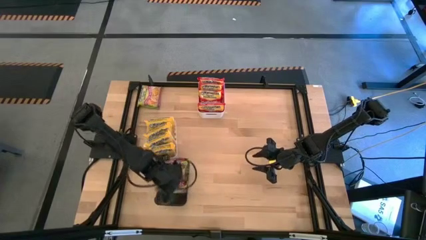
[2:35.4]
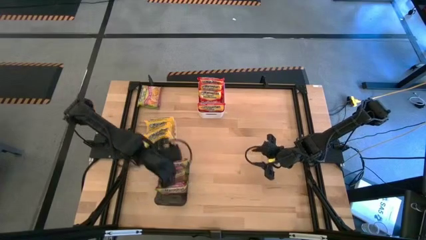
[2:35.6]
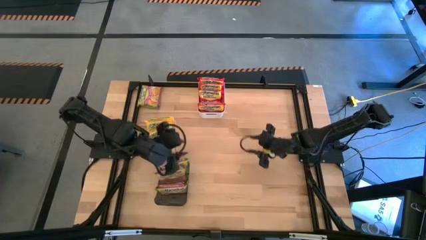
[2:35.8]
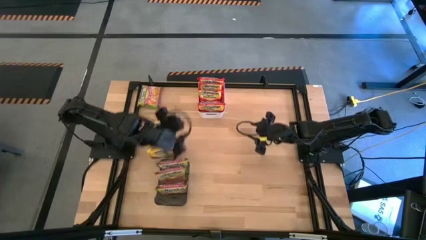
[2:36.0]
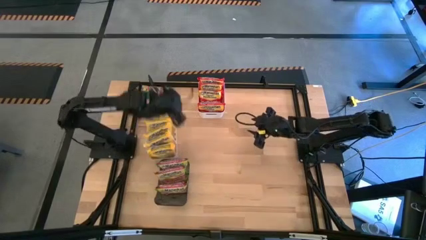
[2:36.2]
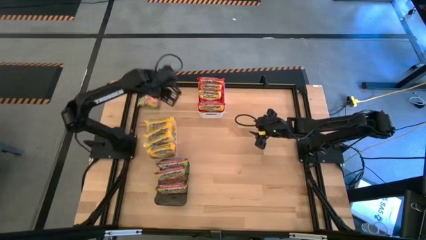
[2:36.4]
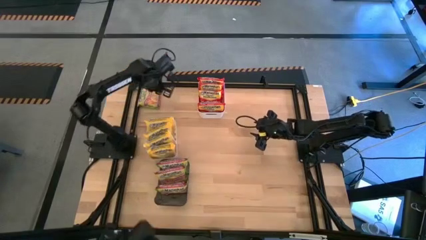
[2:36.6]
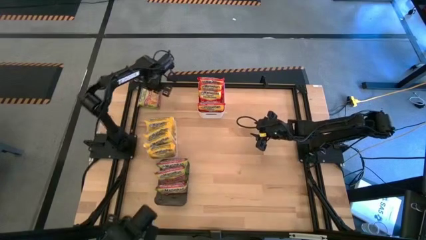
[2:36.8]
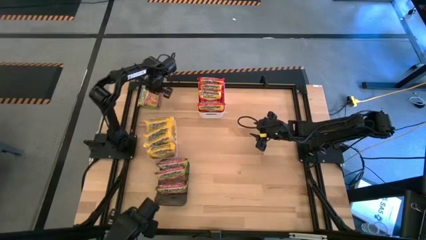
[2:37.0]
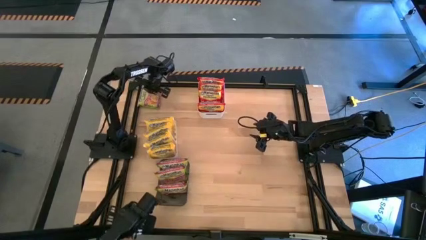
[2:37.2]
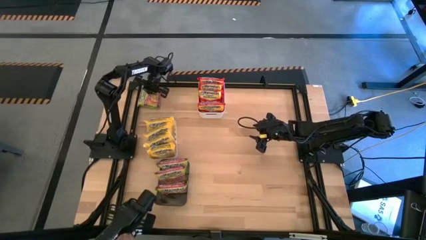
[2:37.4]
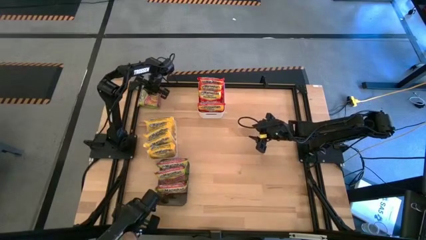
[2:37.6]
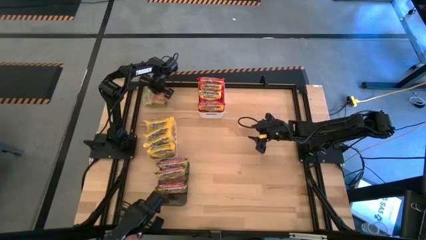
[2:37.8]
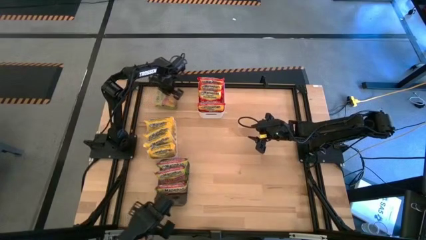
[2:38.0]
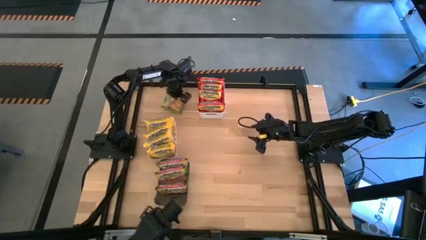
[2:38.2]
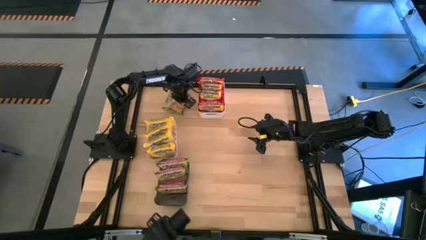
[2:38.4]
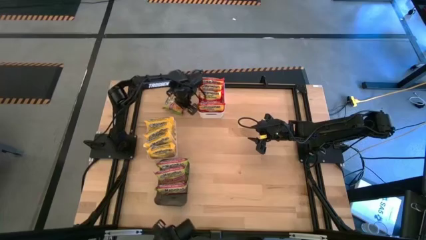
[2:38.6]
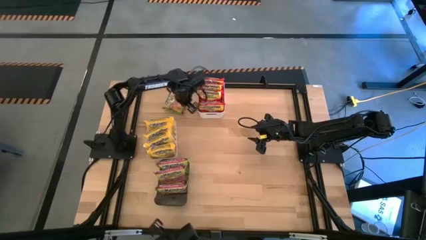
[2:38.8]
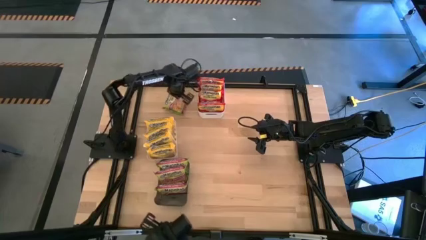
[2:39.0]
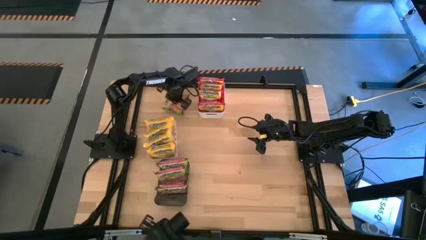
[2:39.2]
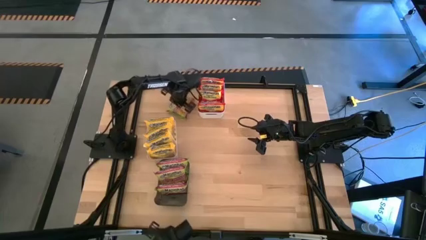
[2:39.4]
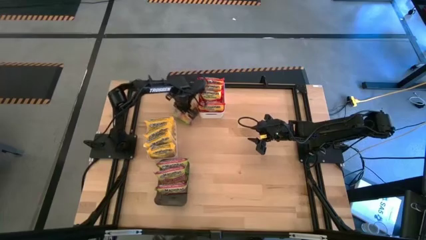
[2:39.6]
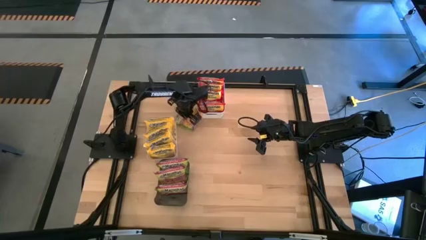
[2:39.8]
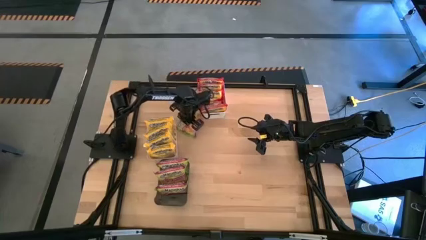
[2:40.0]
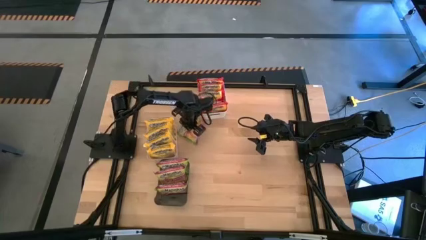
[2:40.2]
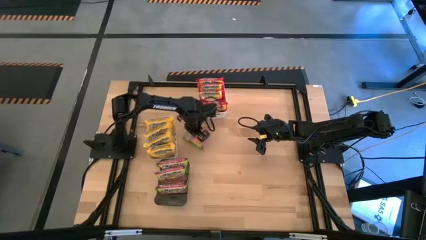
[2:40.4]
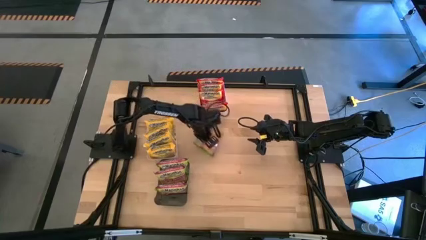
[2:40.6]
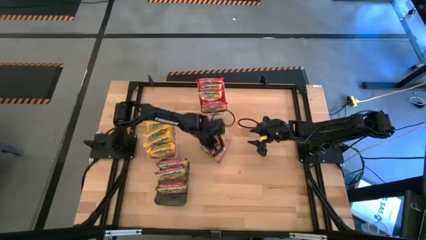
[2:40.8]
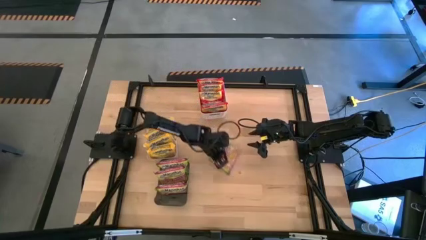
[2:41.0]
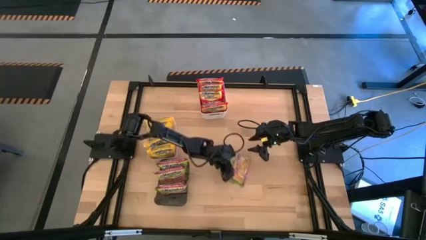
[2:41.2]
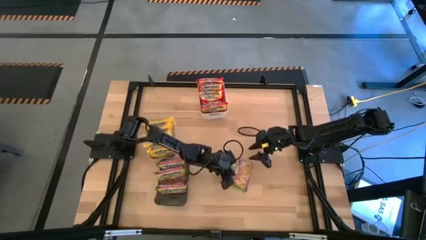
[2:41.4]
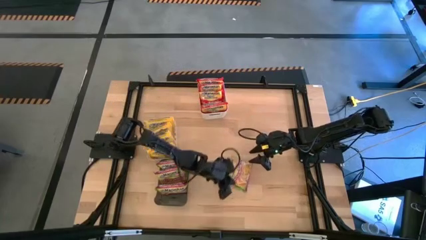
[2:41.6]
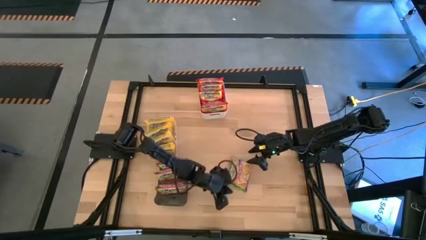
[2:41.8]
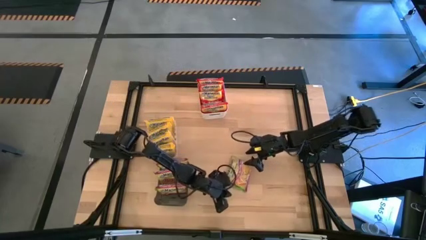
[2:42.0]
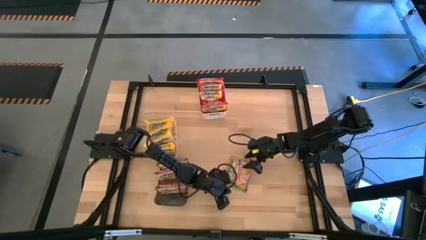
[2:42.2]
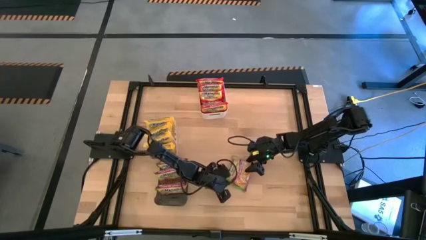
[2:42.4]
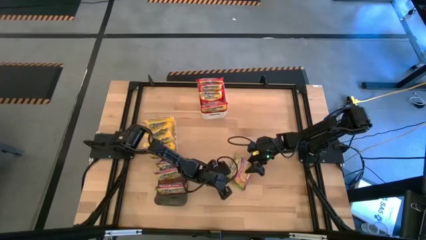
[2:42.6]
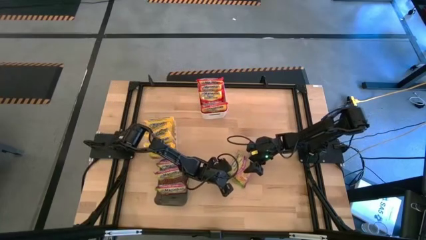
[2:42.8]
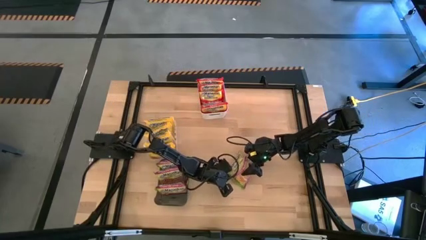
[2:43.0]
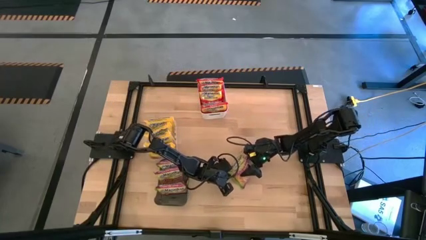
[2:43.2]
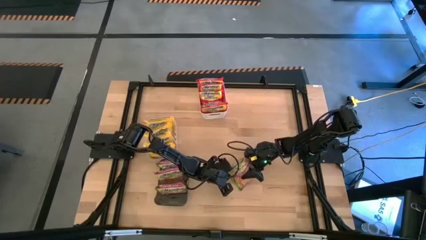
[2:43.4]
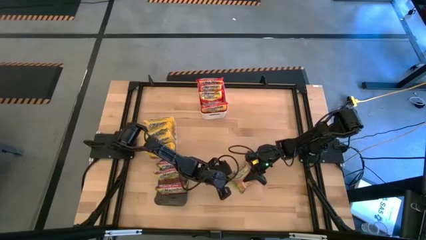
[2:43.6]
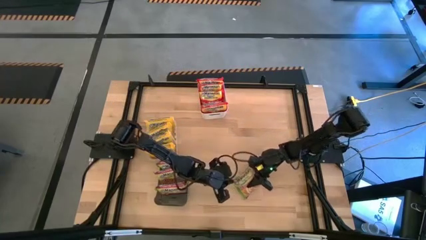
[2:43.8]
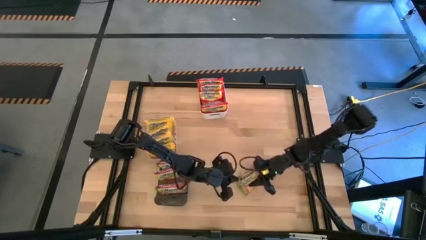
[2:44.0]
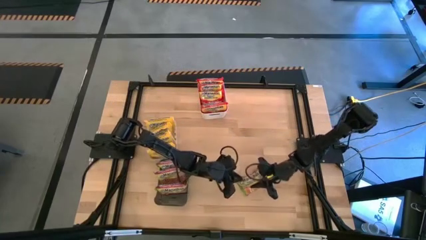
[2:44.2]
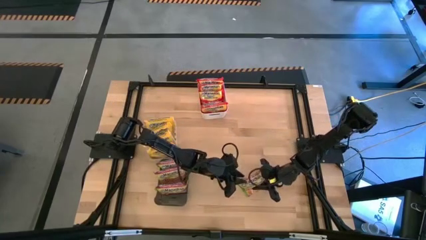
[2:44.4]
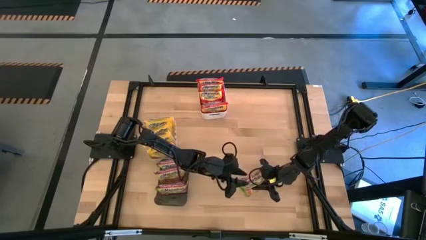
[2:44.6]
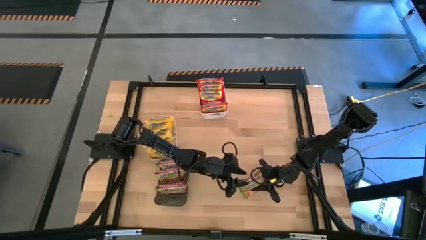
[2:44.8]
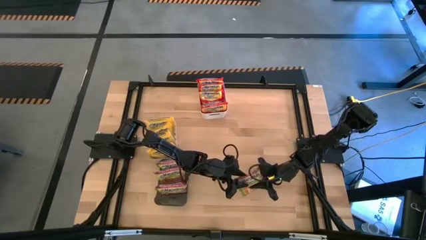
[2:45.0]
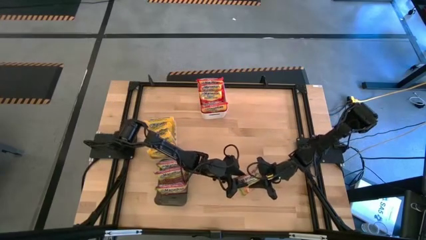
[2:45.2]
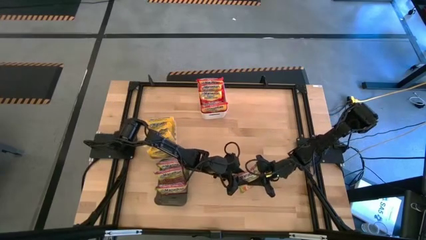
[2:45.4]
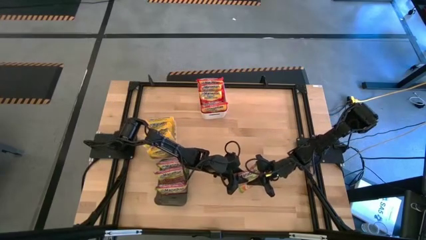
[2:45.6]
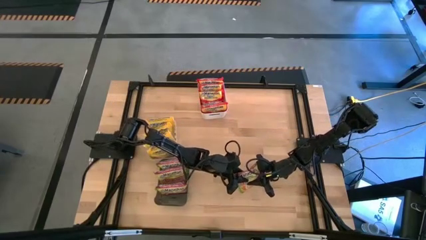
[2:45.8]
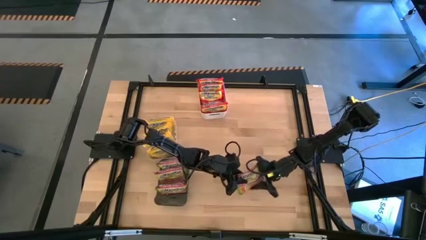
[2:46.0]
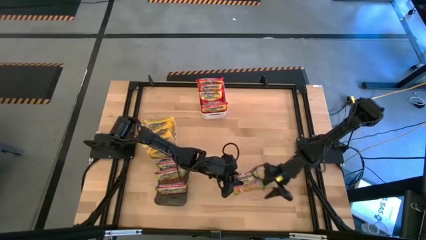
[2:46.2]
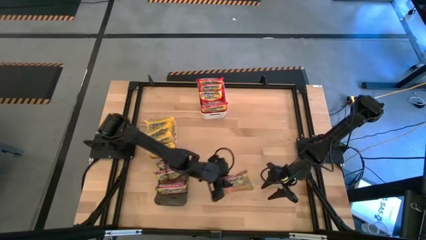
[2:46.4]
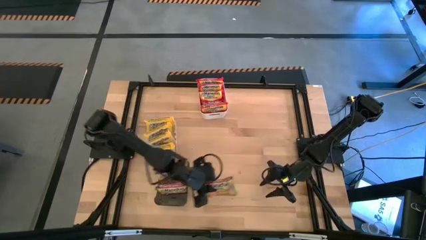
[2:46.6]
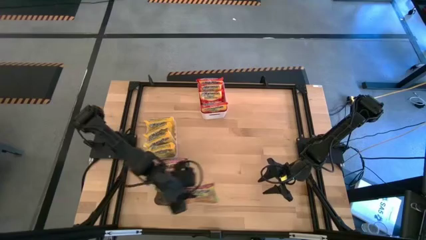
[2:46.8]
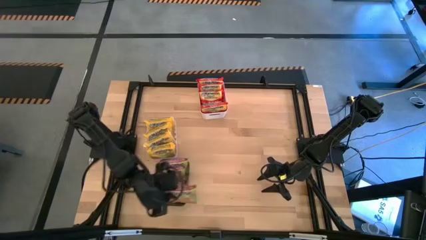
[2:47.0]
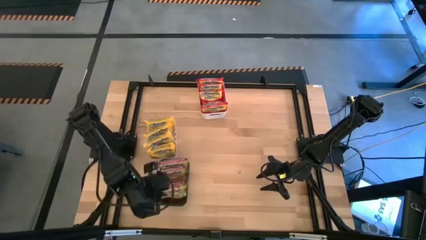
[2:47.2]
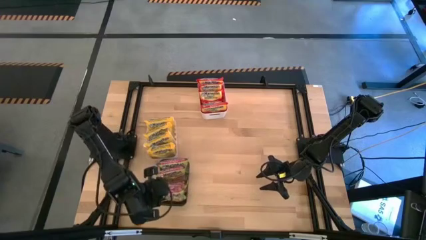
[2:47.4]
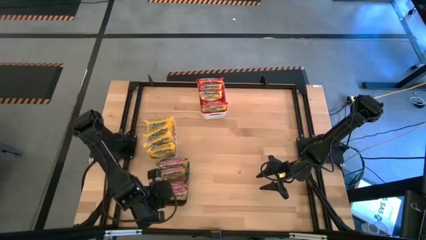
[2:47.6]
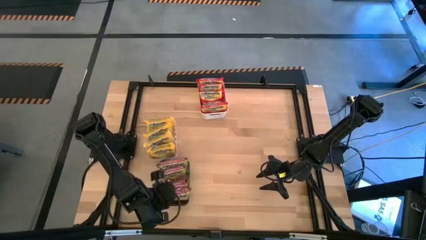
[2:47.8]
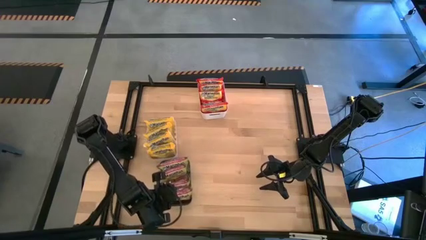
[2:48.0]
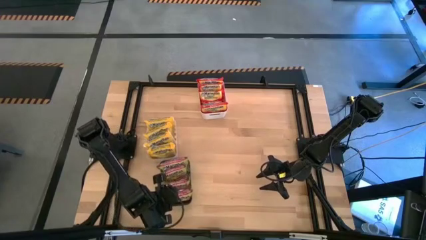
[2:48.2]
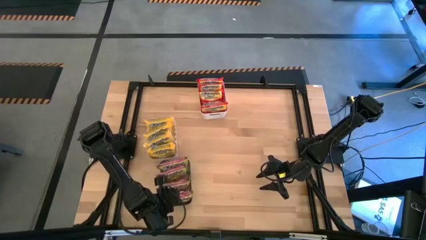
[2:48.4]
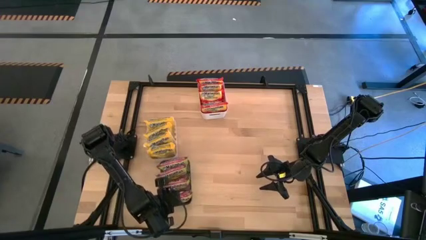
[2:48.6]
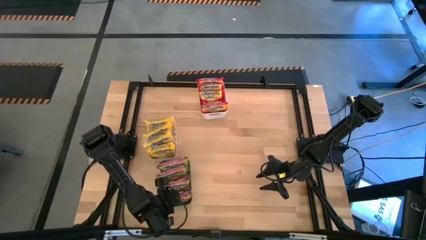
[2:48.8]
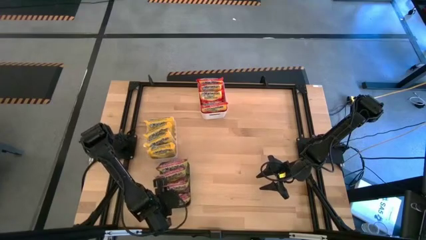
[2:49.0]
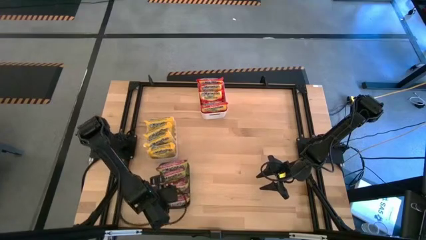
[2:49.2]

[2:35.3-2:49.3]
Task: Sort Maruchan noodles
Put the green noodle pack into the black bin

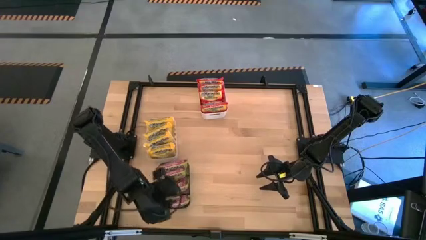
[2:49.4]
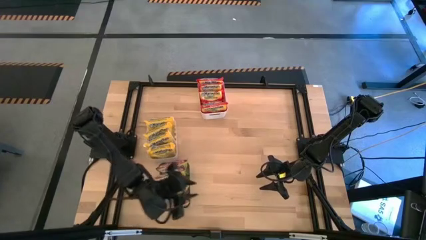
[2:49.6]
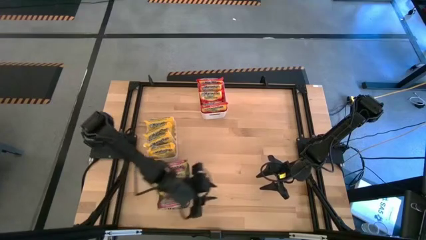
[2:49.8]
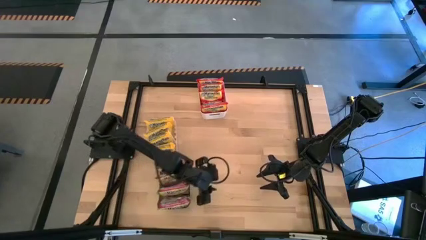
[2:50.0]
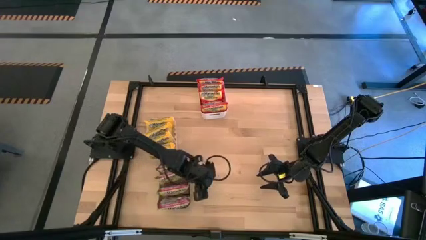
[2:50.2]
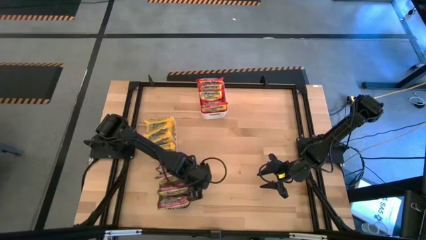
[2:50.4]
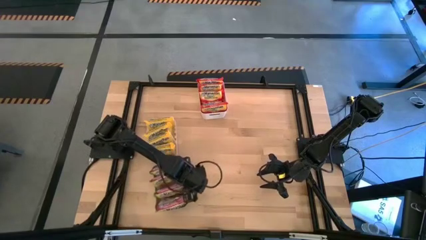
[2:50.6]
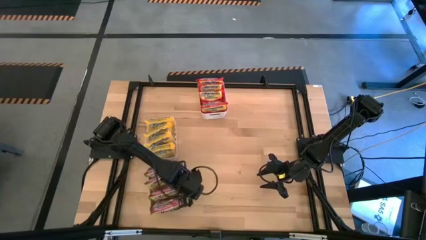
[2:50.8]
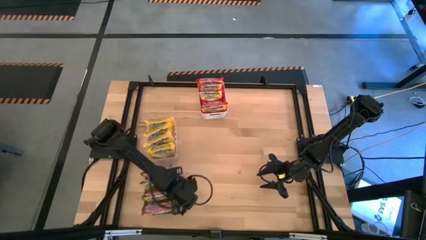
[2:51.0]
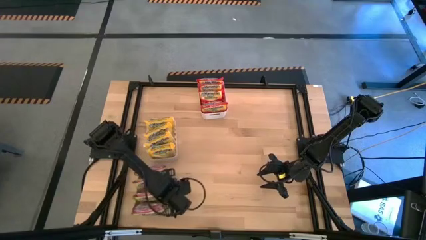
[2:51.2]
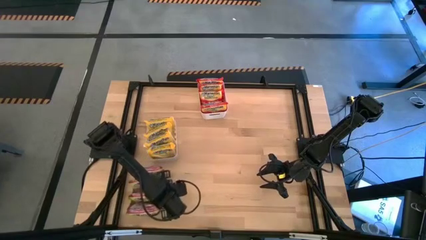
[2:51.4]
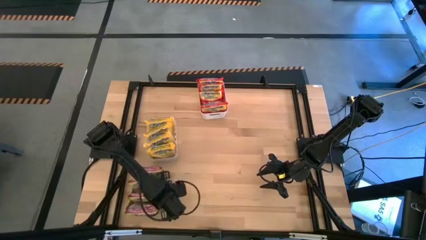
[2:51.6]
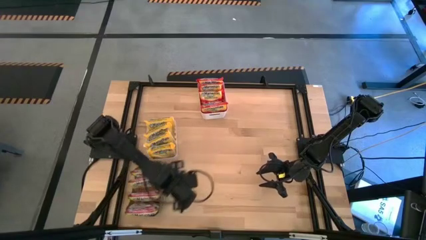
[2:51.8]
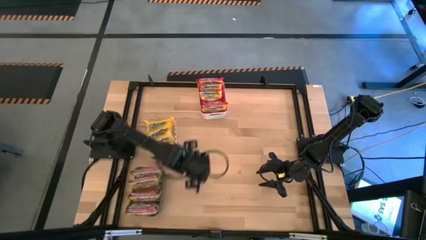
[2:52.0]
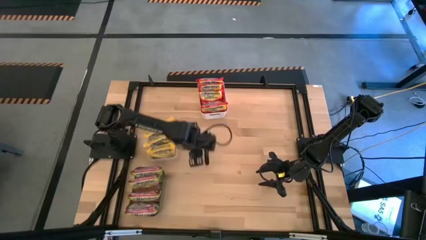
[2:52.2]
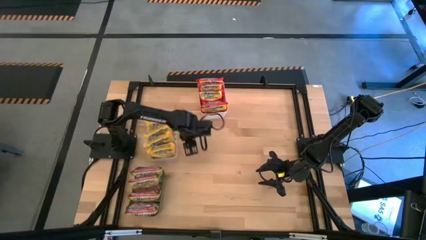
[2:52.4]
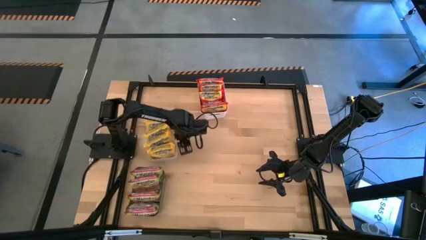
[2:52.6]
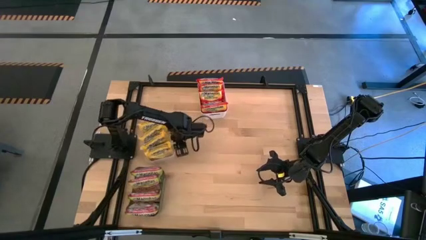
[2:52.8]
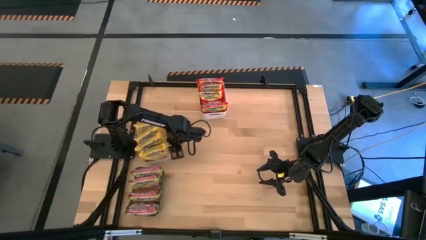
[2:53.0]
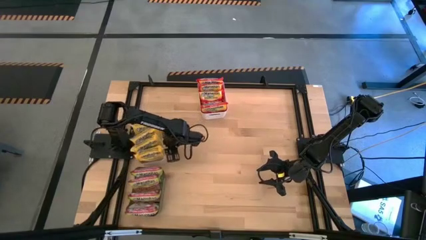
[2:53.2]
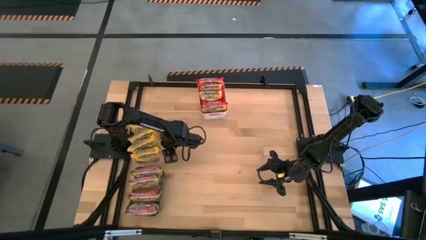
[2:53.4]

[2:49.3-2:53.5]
Adjust the bins
